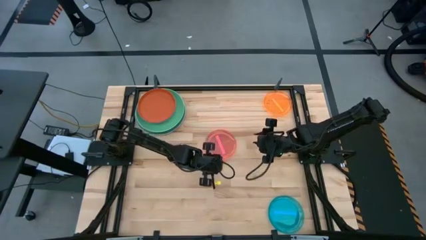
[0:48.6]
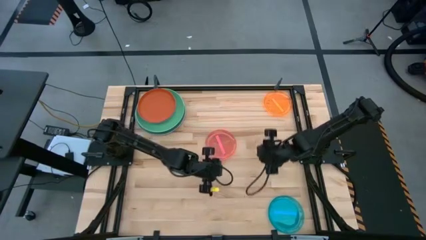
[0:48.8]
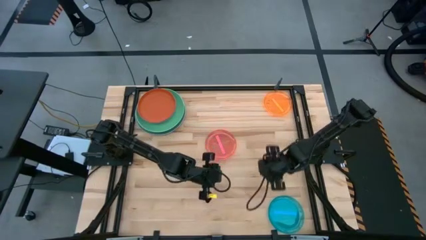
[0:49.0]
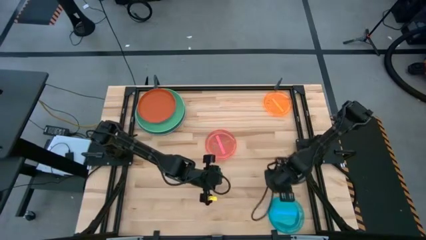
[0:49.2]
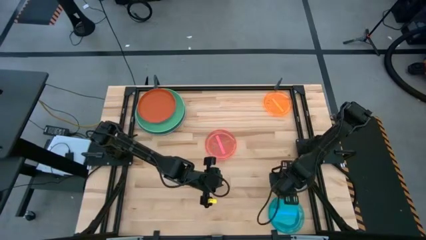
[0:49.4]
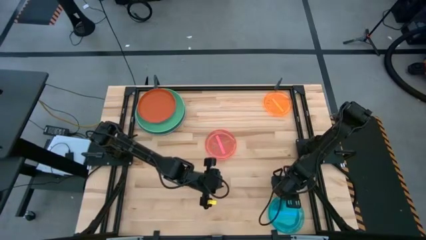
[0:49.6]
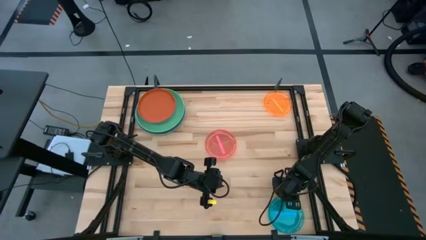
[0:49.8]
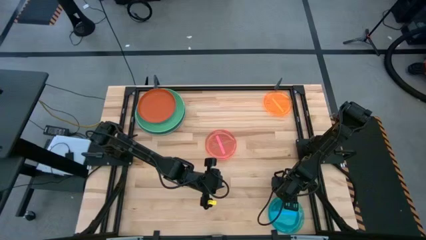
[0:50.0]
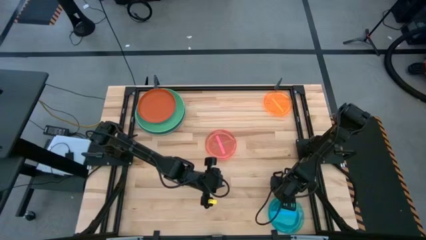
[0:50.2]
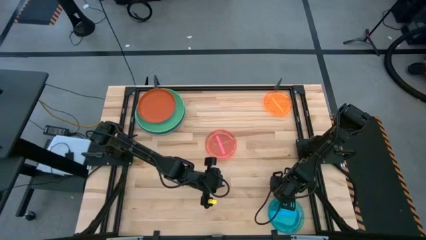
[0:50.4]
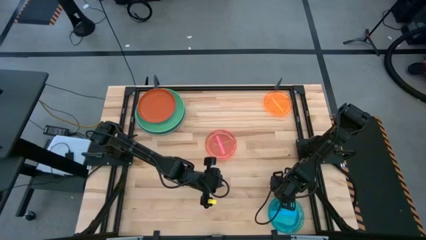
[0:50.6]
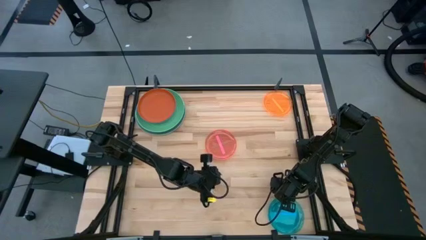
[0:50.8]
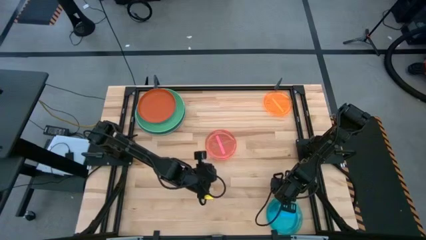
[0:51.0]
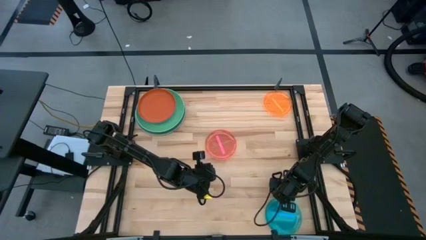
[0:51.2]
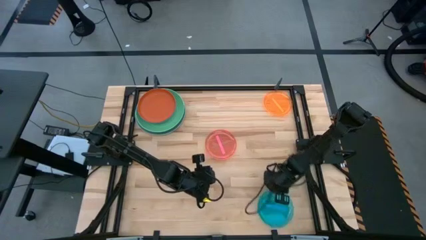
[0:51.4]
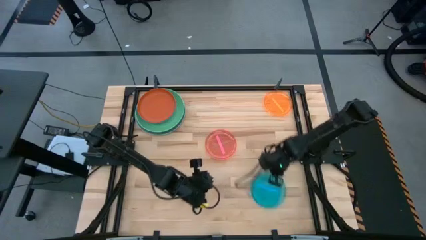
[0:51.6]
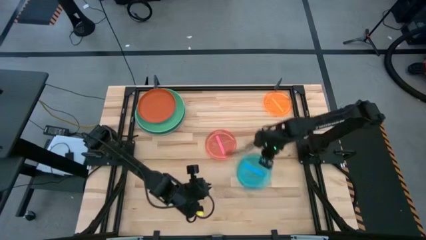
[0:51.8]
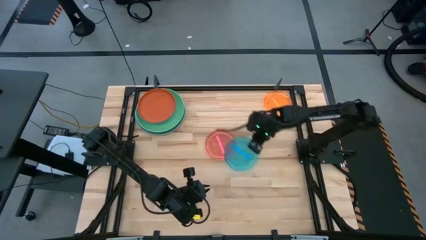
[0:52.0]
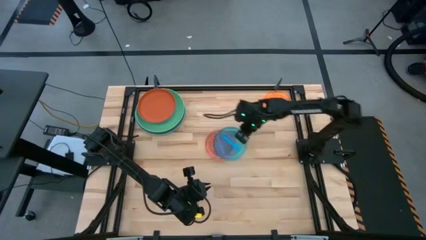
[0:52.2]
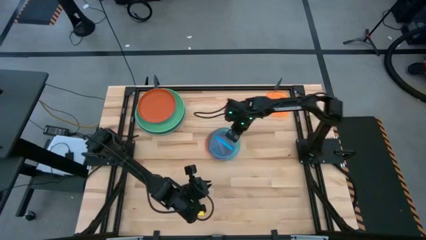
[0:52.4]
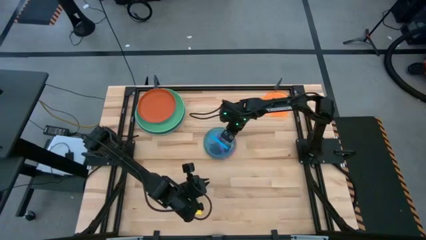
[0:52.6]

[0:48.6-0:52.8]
Task: Stack plastic plates
Stack the small blue plate on the small red plate

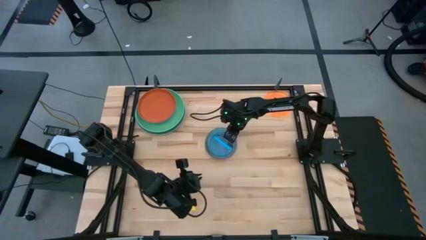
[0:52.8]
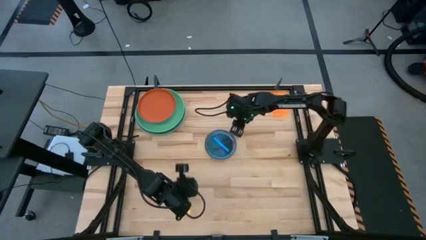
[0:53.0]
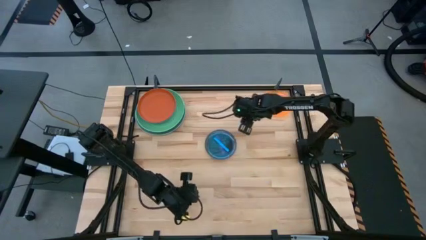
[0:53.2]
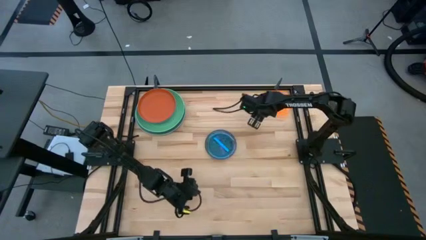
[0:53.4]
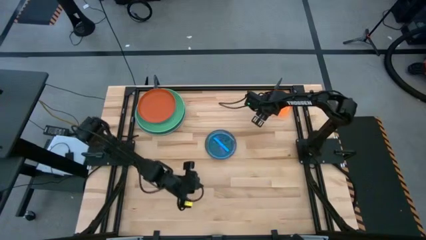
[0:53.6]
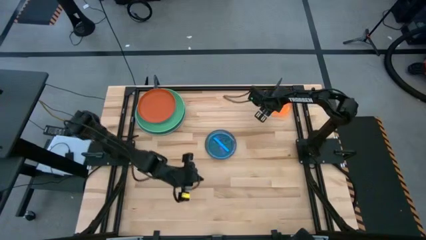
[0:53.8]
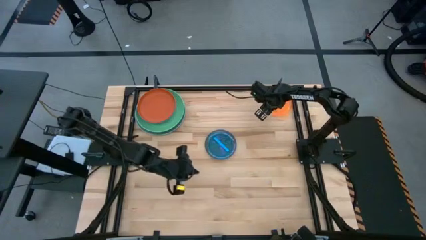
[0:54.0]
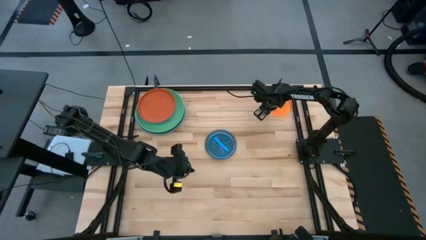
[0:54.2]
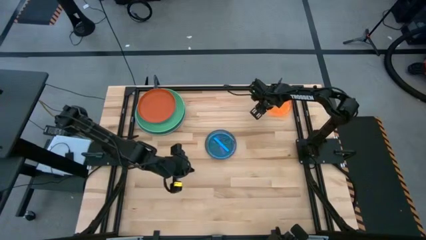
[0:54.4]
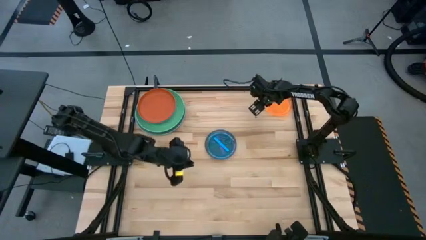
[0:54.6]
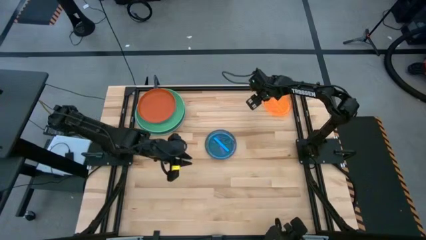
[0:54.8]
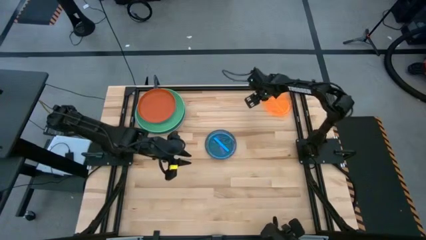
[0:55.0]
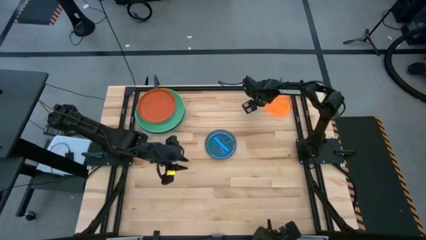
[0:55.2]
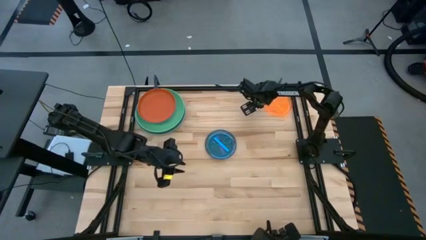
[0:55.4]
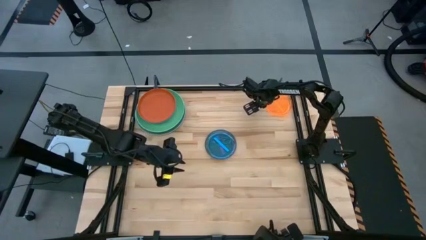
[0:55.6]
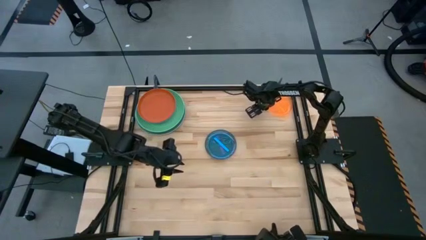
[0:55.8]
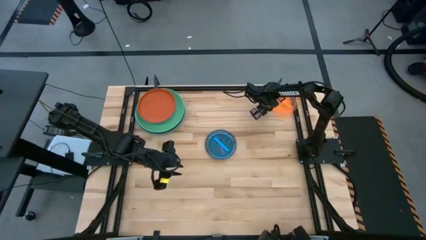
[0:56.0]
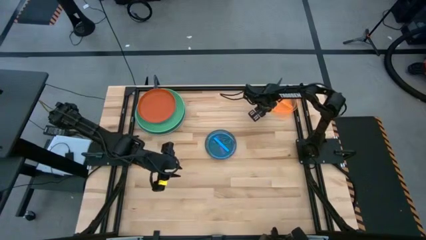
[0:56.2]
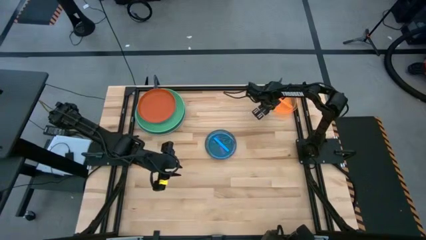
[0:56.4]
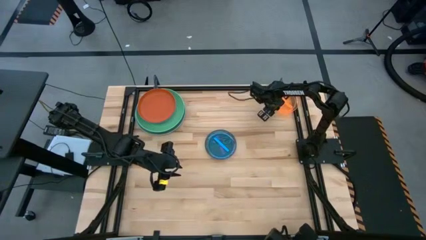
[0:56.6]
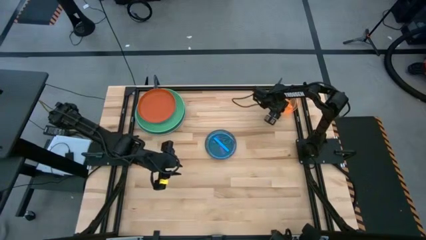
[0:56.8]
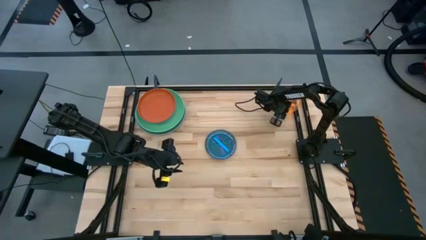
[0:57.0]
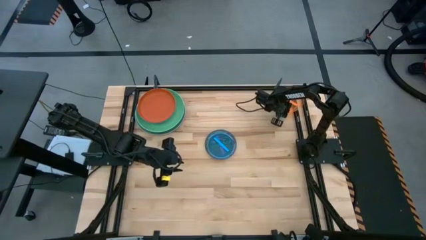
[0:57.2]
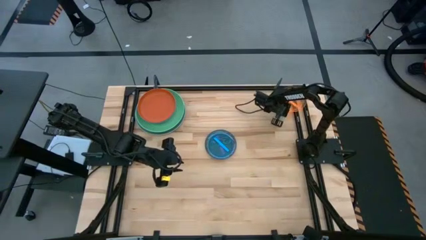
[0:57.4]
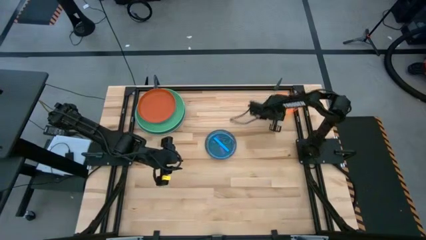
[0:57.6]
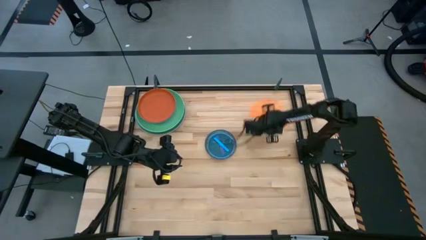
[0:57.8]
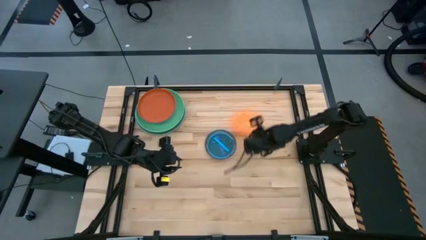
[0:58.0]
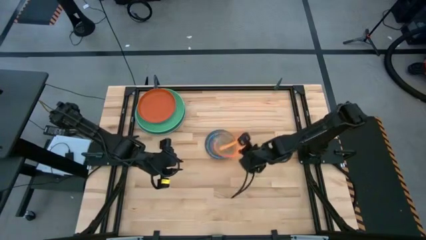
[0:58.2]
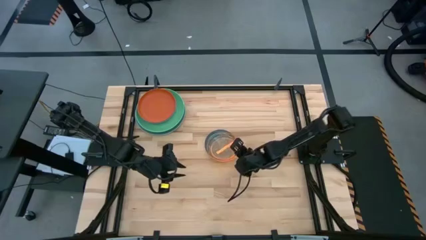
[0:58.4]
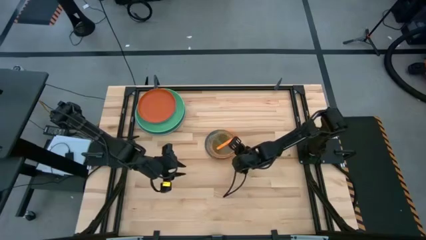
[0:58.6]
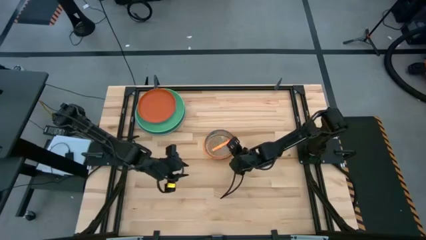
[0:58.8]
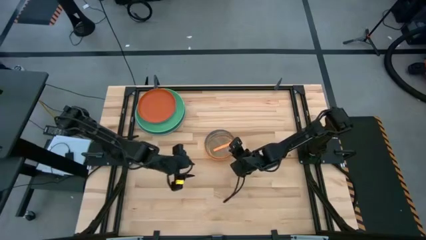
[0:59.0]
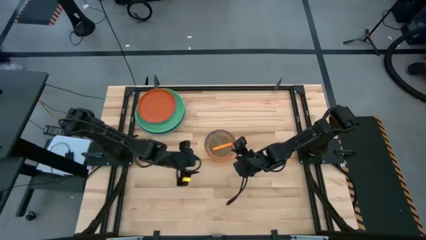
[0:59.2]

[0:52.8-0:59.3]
Stack the small orange plate on the small blue plate

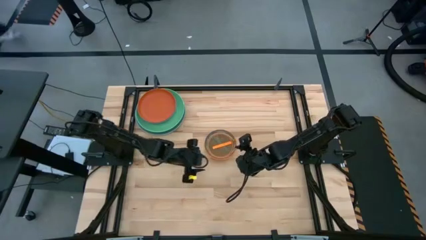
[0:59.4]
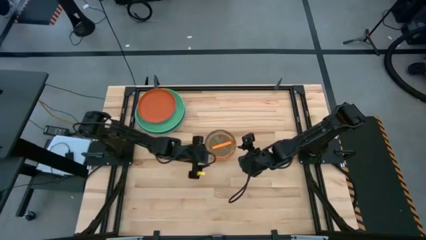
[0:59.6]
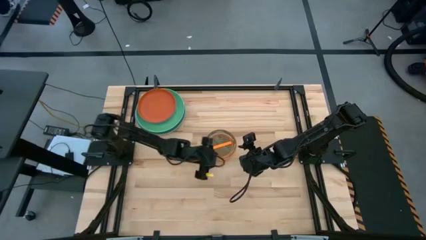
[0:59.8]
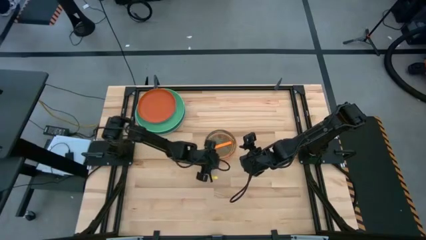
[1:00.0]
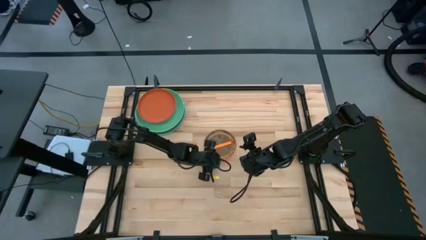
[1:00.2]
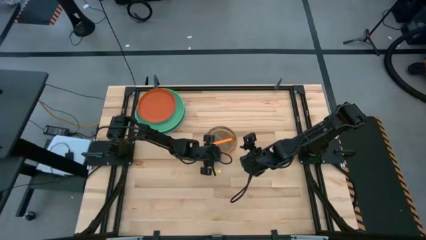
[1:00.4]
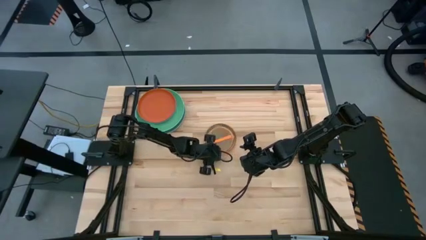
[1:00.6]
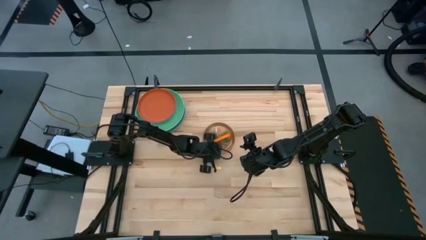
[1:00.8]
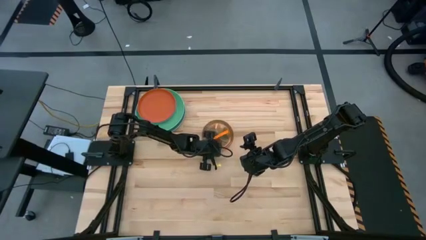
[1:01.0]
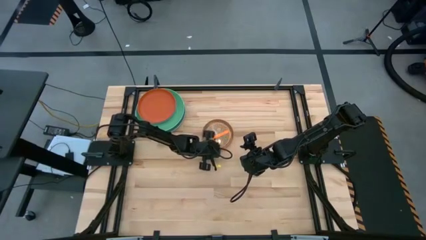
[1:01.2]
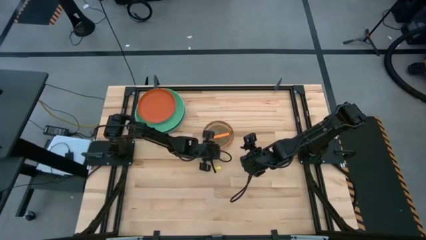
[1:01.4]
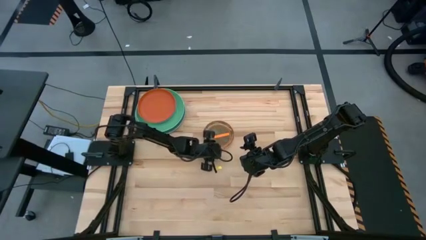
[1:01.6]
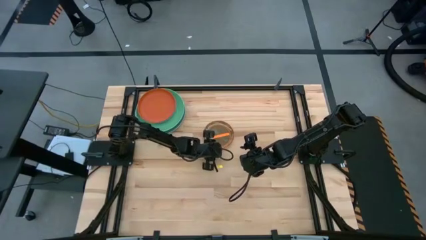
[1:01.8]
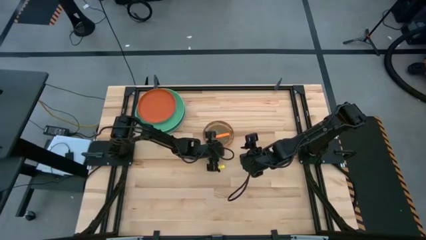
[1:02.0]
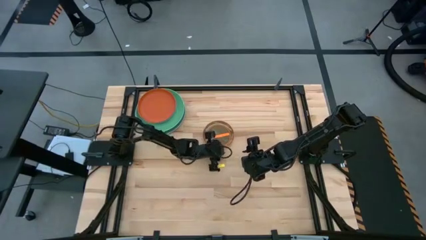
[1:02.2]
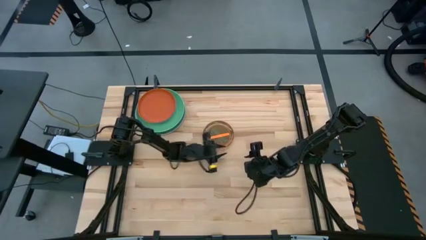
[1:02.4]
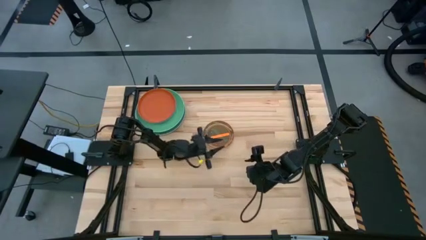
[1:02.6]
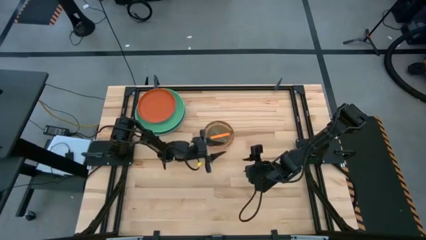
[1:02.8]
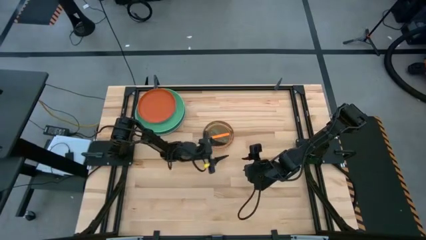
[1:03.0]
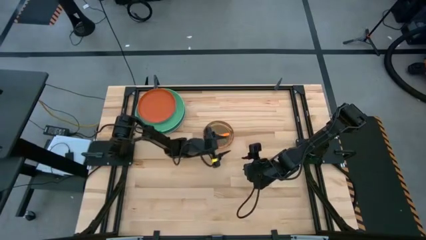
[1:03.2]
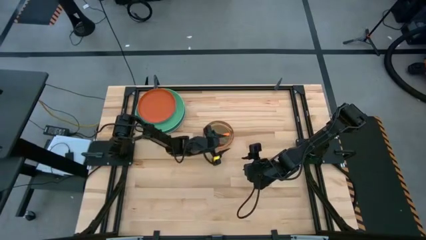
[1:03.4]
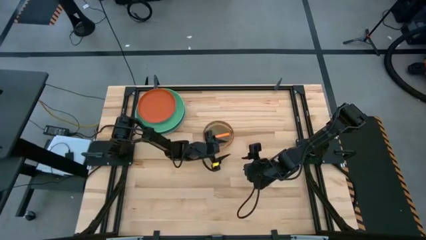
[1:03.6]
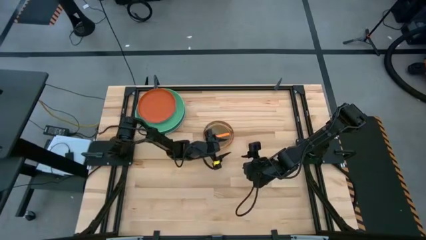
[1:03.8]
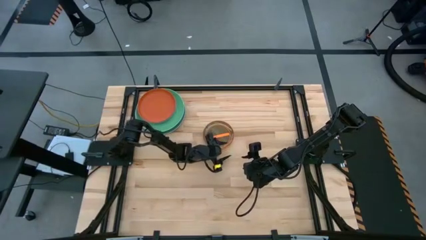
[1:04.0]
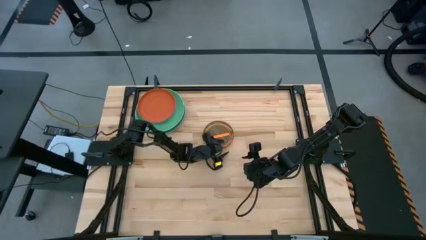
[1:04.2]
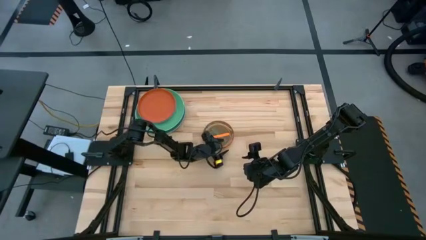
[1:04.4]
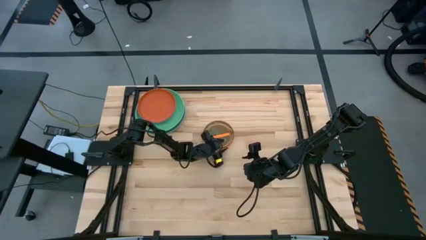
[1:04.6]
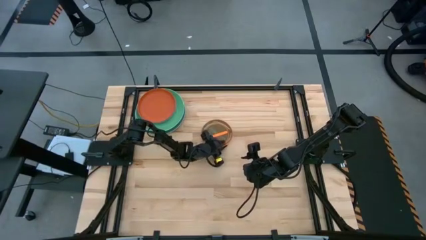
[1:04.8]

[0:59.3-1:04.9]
Stack the small plates on the small orange plate
